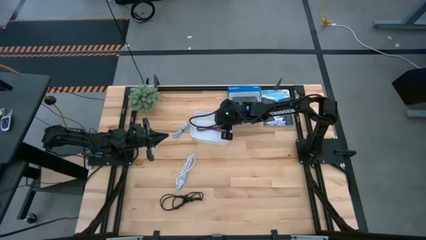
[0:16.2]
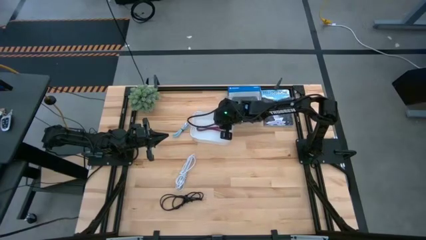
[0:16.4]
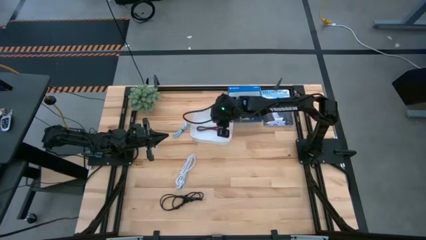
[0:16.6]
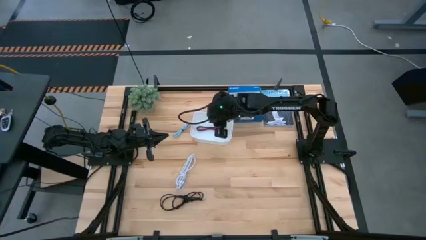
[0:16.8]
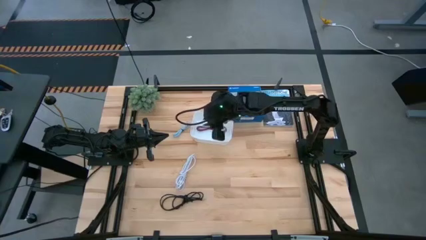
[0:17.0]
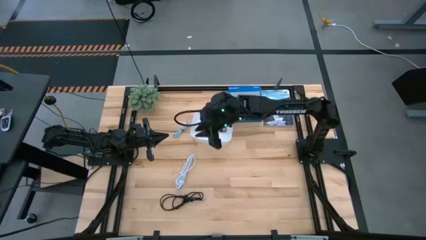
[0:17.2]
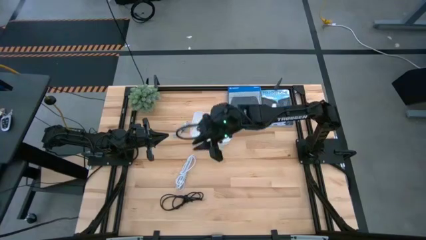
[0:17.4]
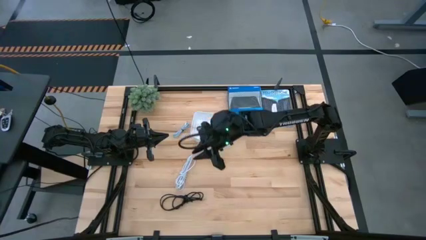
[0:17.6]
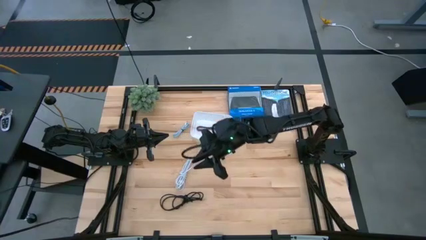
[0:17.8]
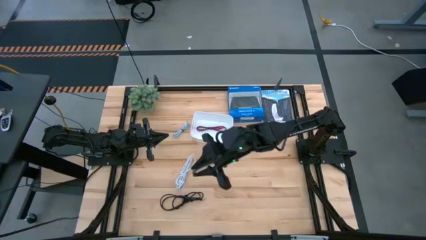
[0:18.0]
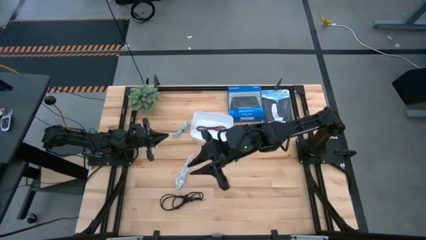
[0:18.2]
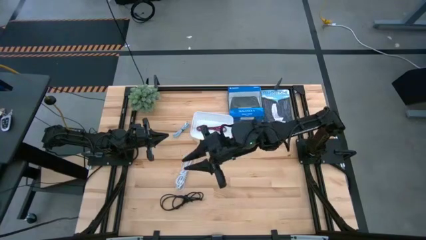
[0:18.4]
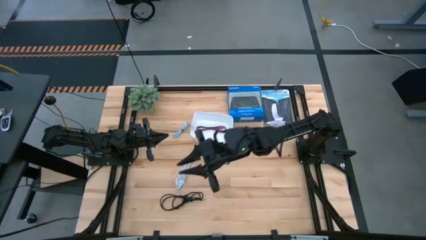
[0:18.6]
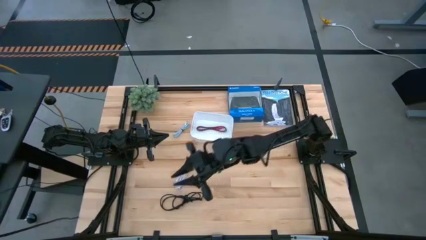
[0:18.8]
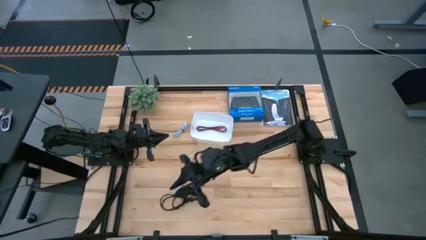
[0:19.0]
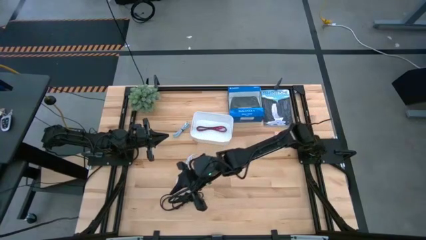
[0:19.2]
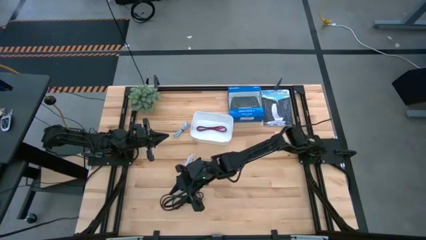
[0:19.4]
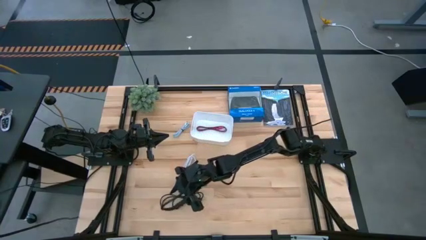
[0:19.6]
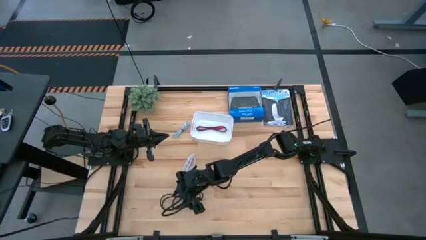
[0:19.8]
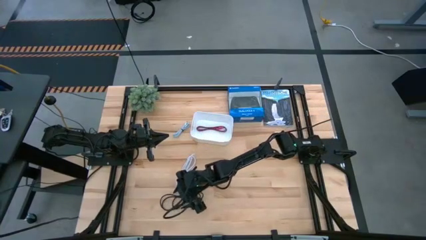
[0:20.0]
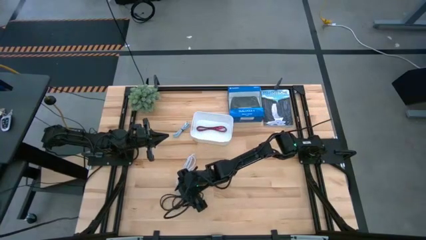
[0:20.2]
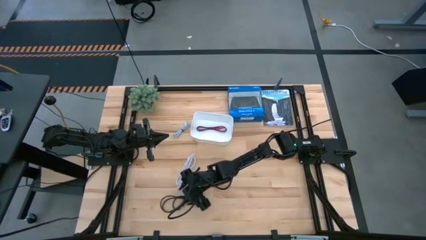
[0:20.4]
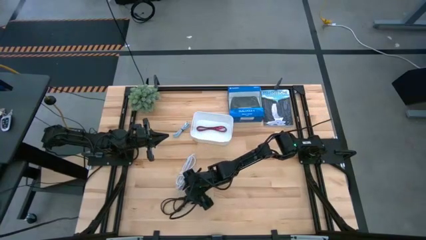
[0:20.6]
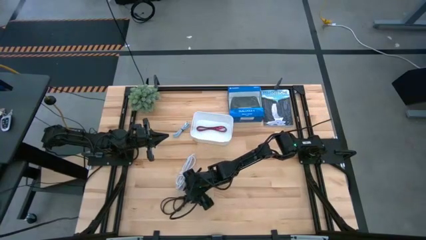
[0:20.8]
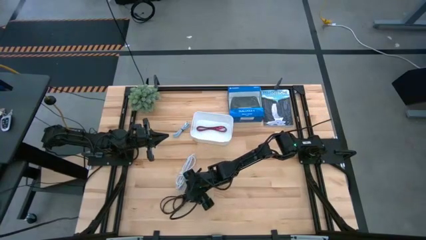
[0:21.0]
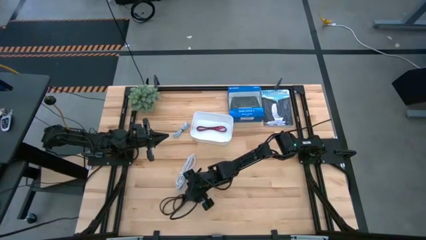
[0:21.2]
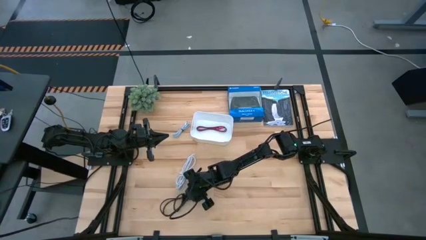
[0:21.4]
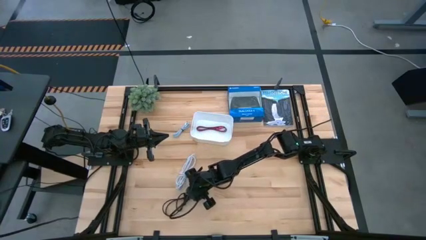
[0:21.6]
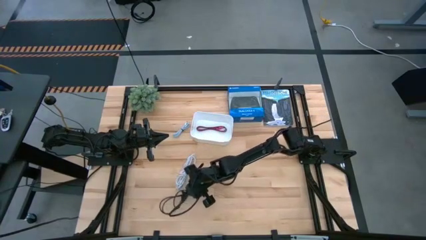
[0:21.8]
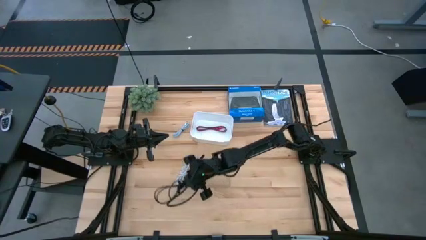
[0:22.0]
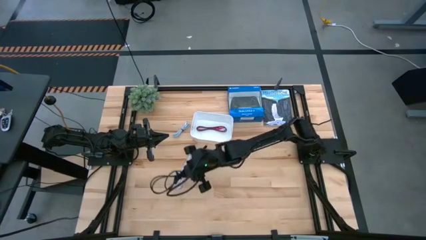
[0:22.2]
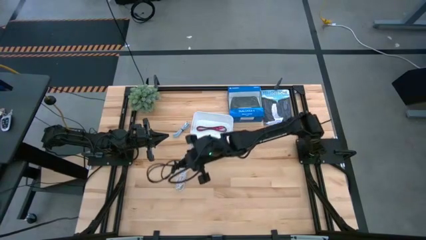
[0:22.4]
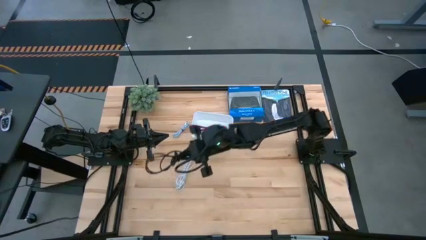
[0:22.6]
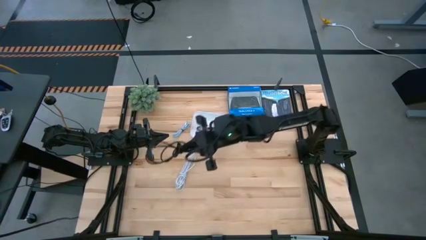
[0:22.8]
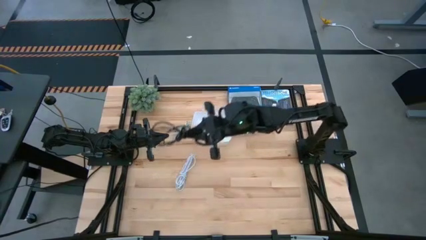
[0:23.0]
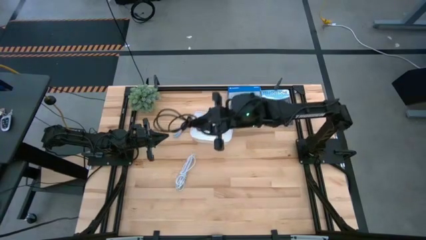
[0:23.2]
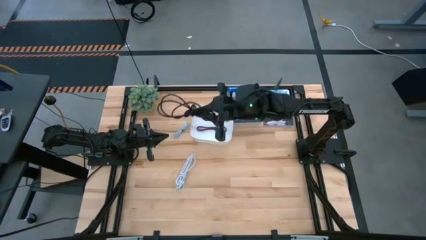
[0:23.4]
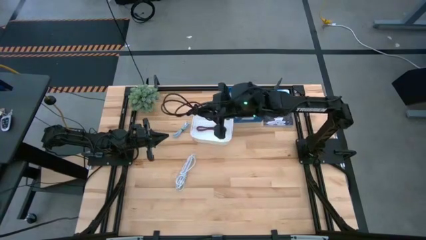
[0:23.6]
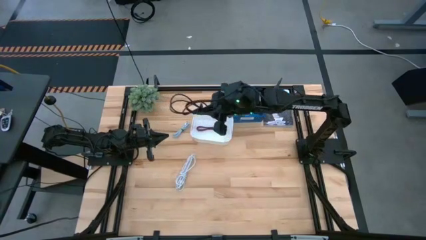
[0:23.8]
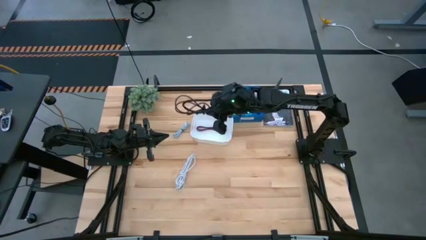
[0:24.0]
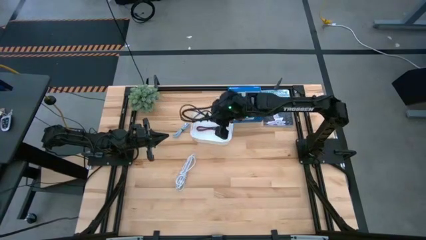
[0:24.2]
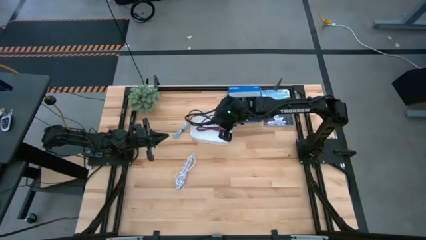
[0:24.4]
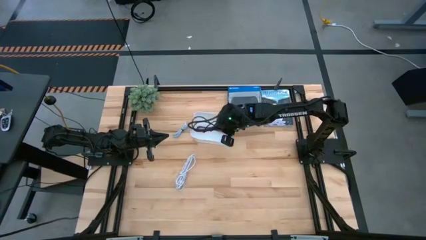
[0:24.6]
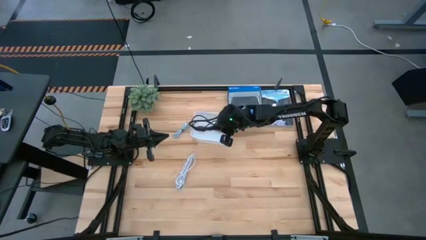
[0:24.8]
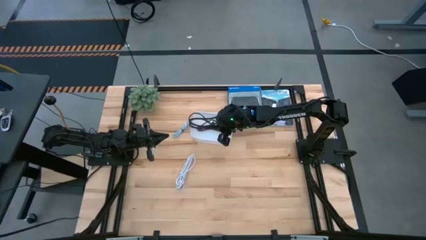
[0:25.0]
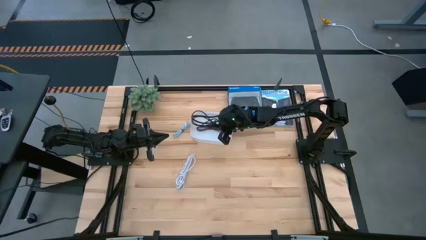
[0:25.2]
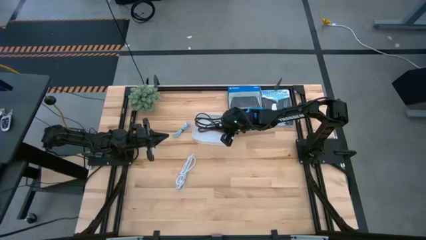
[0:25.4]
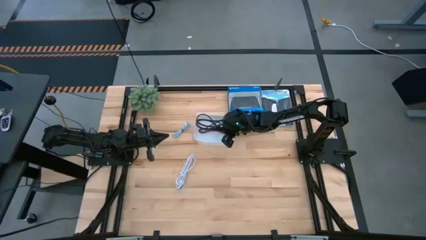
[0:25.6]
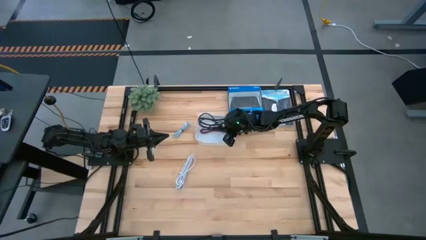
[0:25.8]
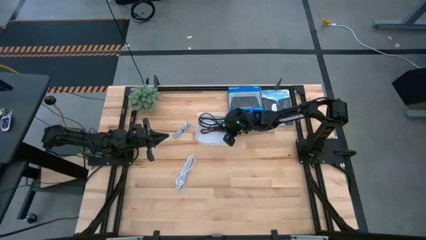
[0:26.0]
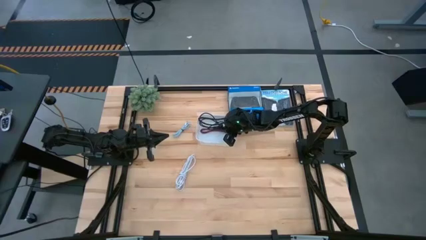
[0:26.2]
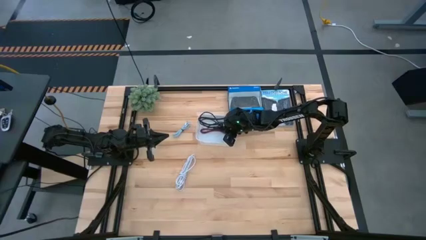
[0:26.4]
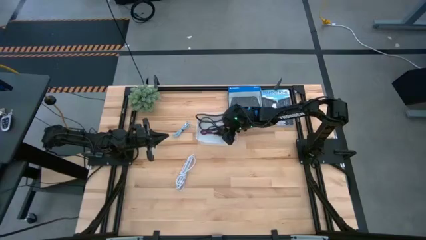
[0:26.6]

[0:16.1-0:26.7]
Task: Pick and place USB-C Cables
Put the black charger cable into the white bin

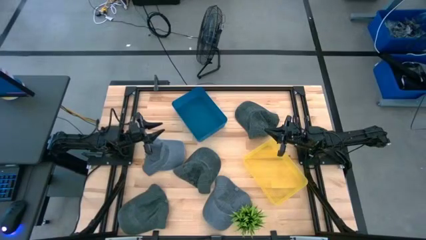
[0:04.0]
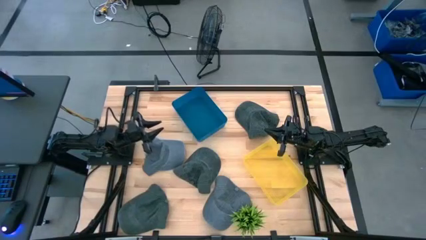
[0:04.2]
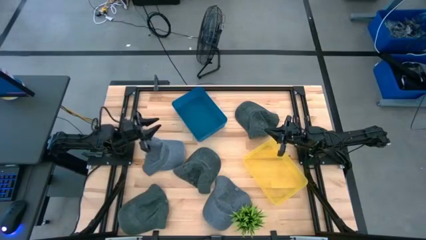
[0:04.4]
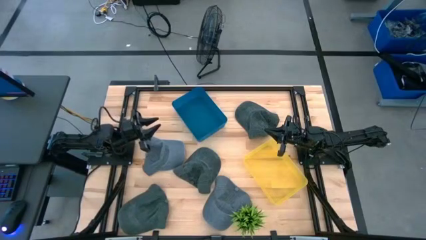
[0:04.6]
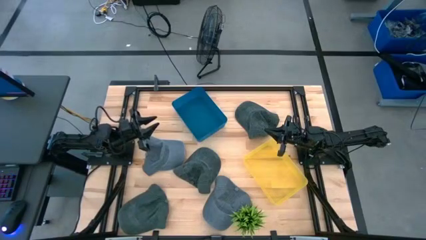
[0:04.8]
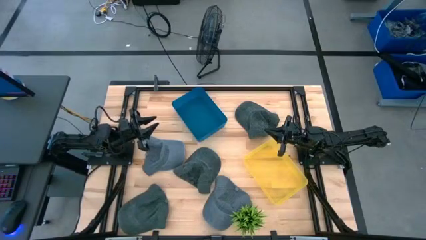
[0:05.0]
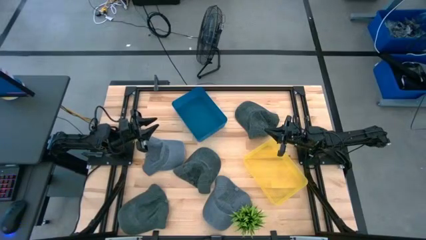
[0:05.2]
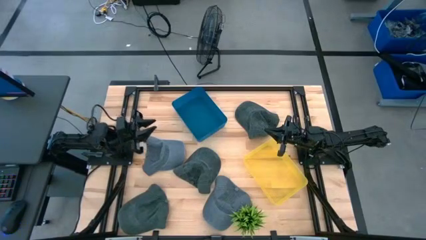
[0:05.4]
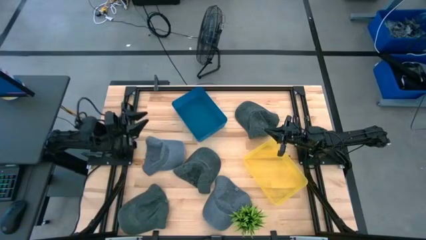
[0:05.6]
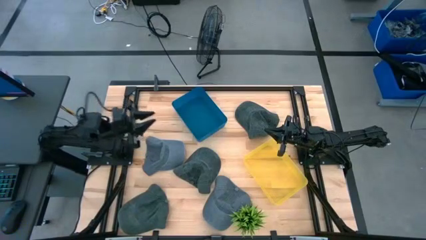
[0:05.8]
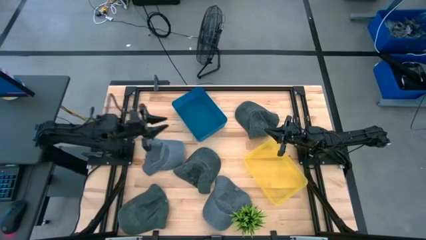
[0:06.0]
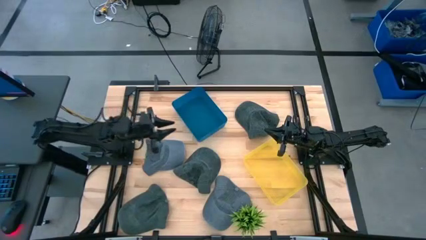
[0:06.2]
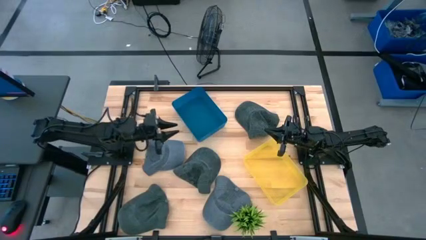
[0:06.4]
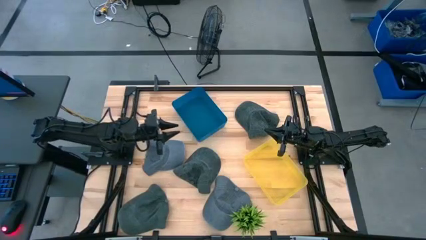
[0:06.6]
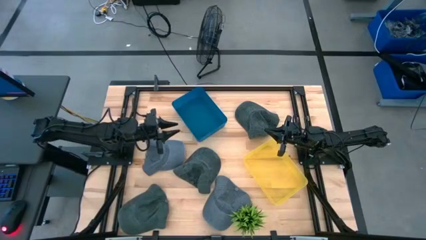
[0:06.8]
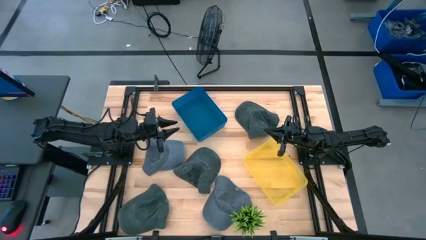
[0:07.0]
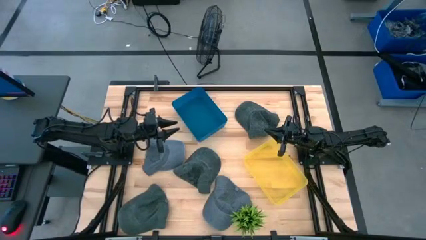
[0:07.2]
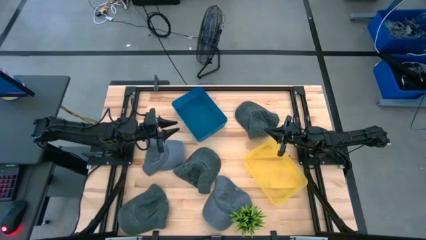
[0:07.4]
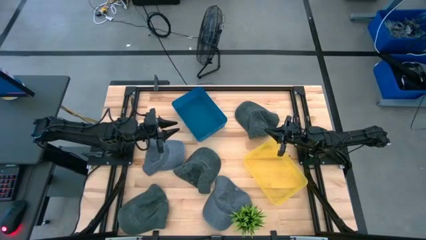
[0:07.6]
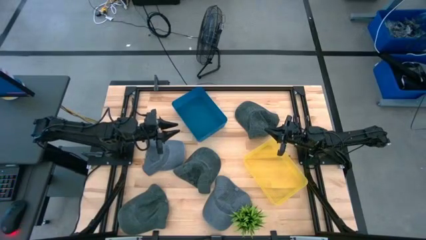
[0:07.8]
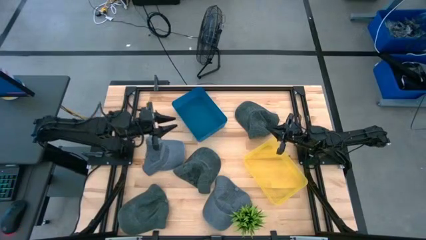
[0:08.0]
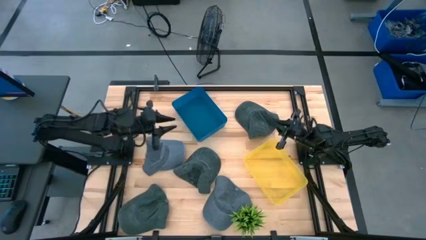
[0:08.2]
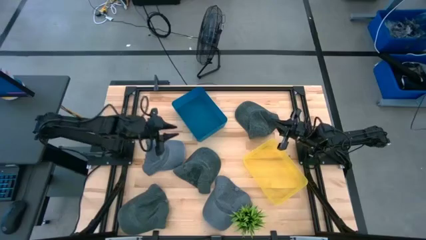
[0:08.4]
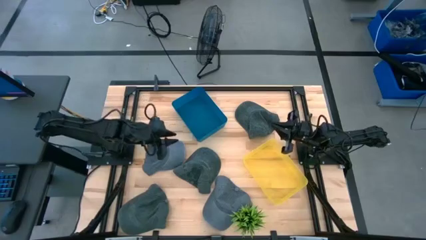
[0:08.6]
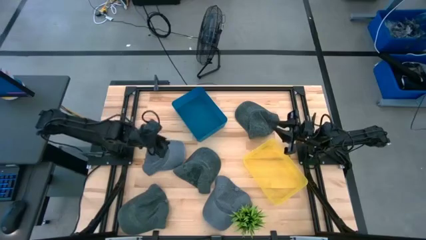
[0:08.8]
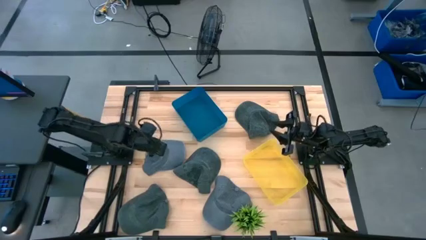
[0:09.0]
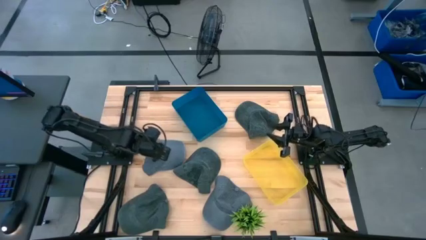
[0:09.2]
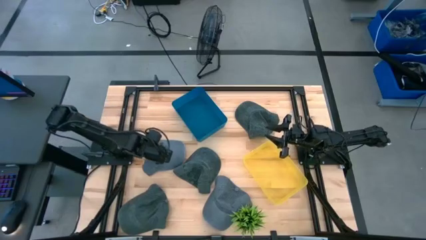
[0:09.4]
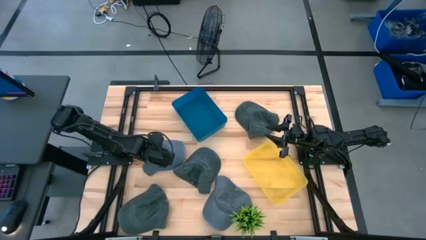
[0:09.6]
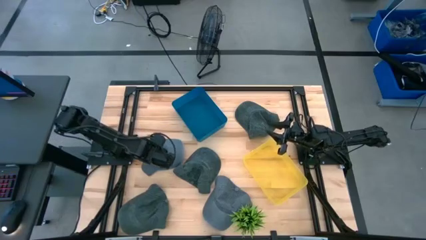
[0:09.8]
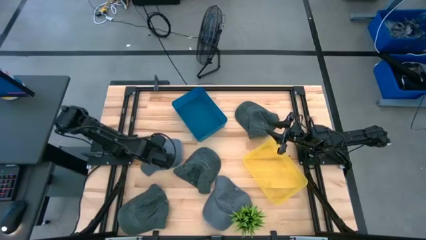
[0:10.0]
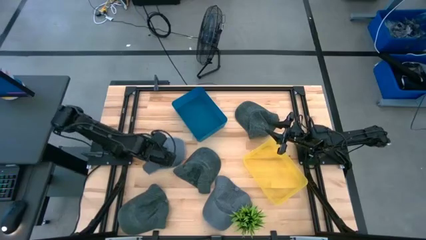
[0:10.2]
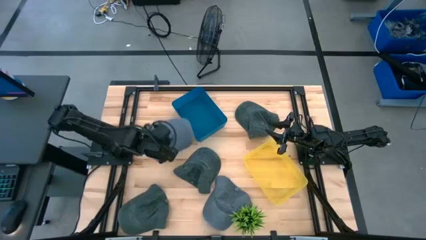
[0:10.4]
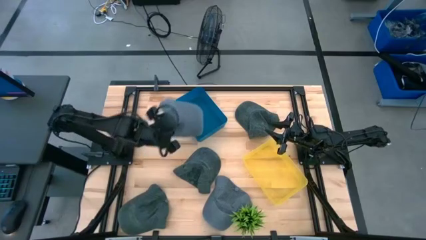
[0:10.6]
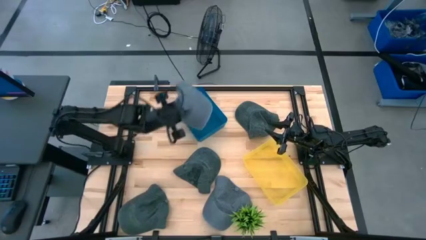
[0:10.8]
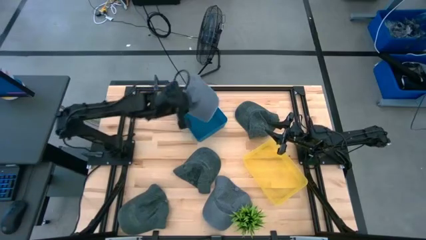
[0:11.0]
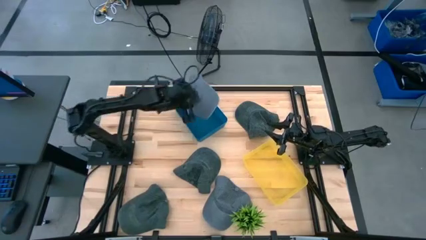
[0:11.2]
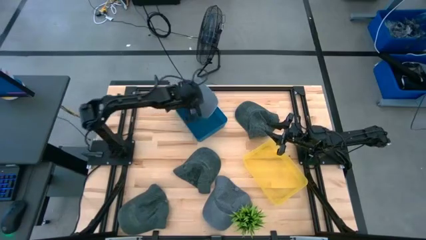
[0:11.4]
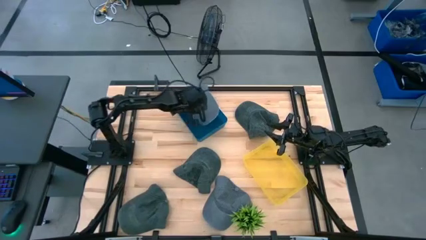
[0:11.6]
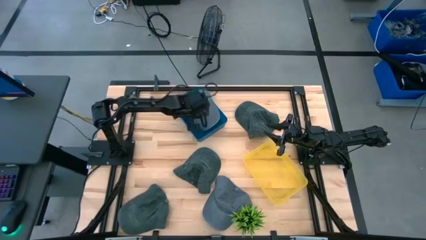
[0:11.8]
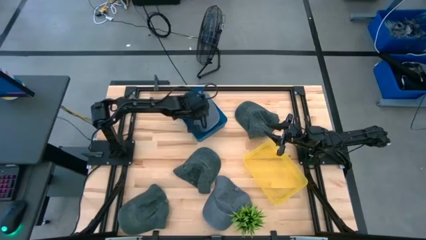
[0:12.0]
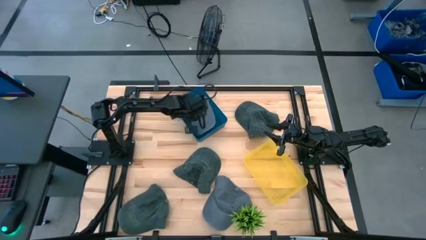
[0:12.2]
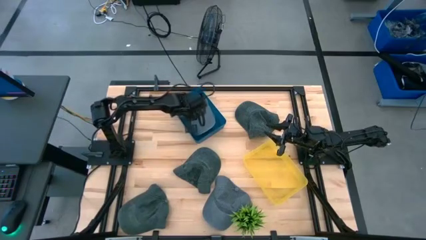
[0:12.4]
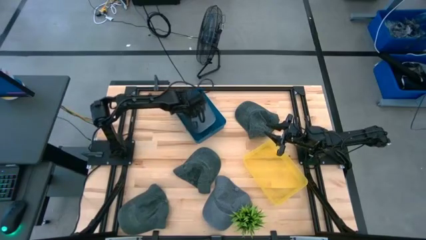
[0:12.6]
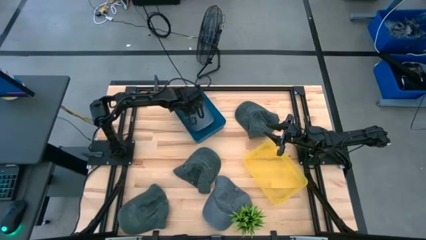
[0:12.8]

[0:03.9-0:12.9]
Task: Pick & Place hat
Put the left gray cap into the blue bin
